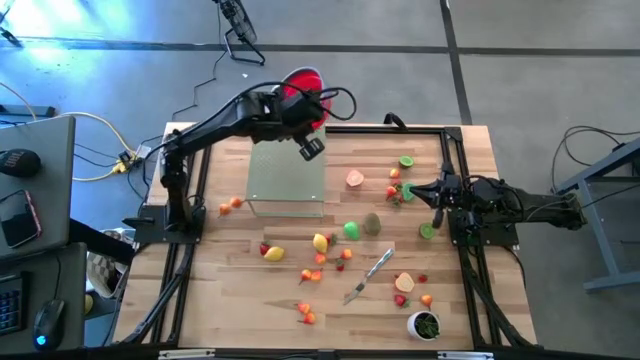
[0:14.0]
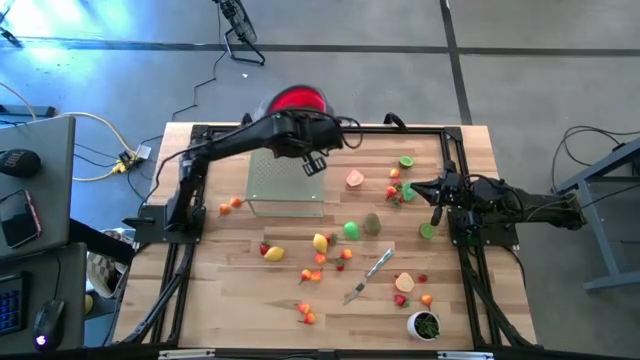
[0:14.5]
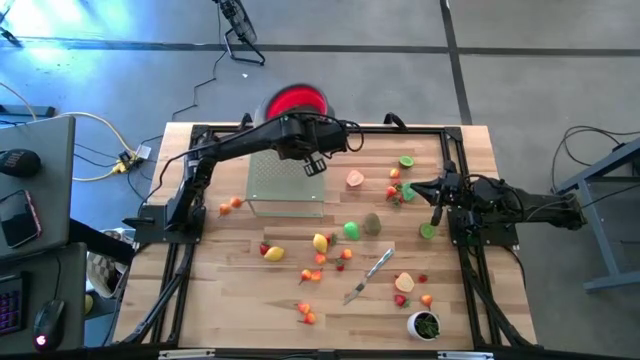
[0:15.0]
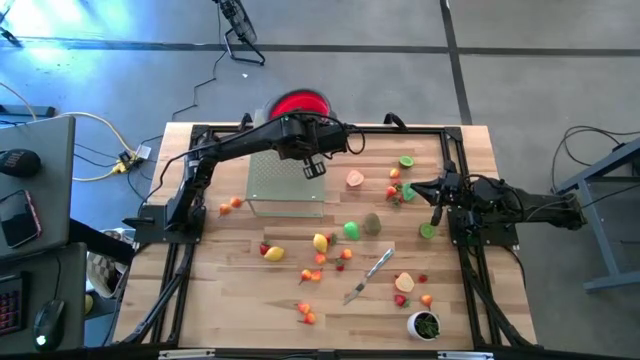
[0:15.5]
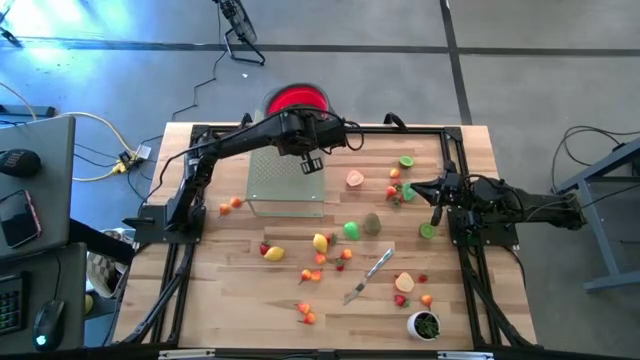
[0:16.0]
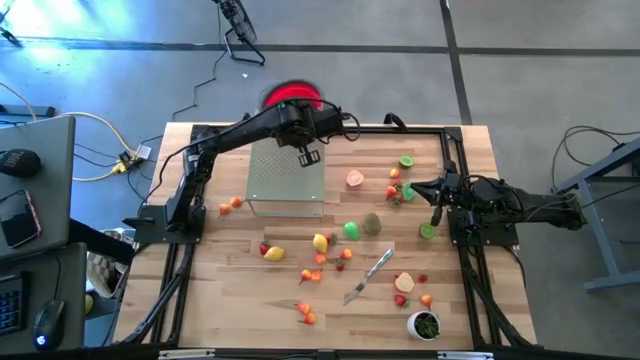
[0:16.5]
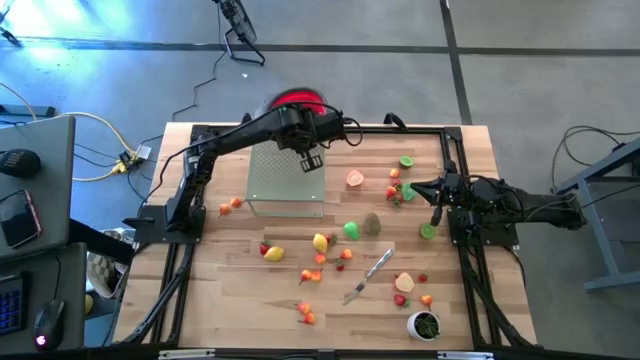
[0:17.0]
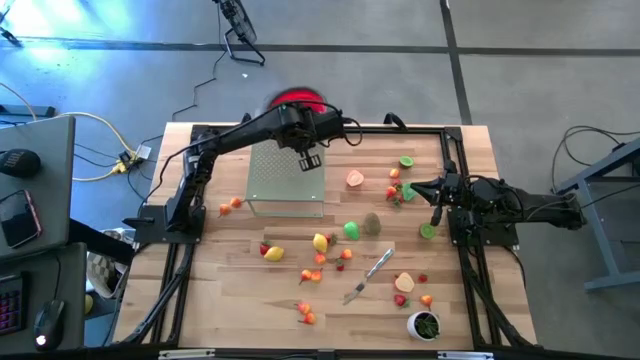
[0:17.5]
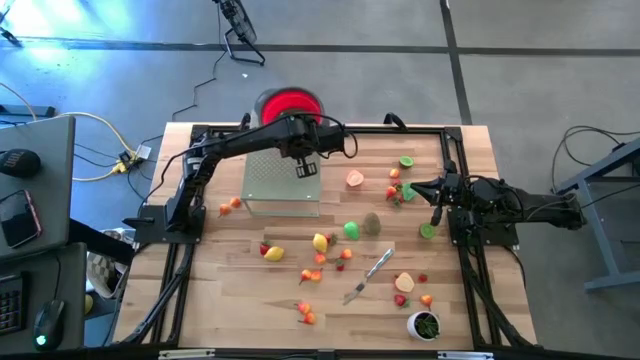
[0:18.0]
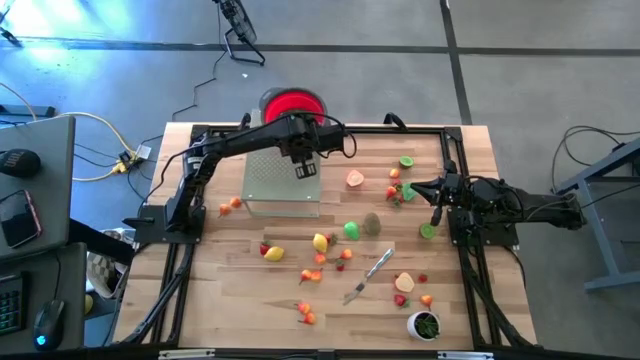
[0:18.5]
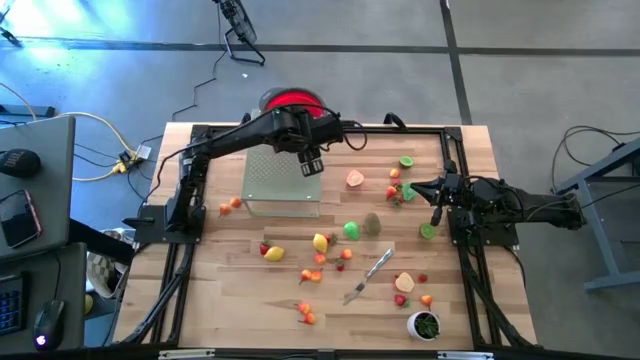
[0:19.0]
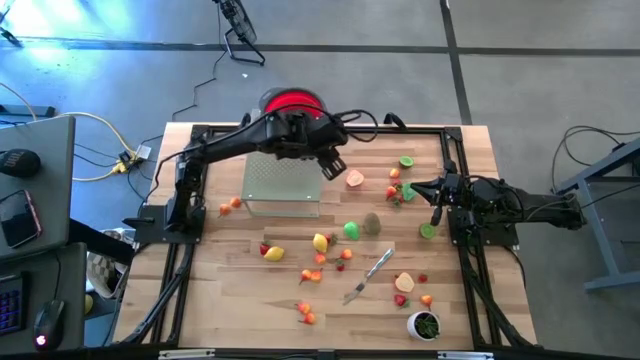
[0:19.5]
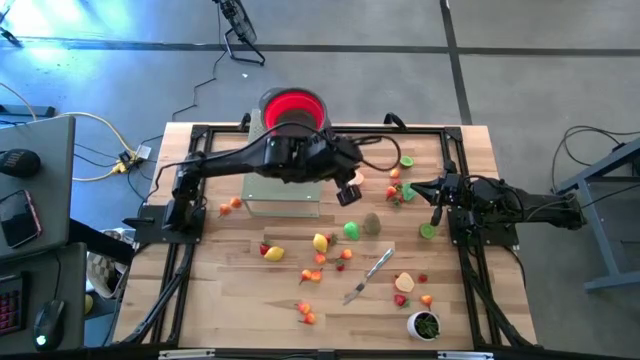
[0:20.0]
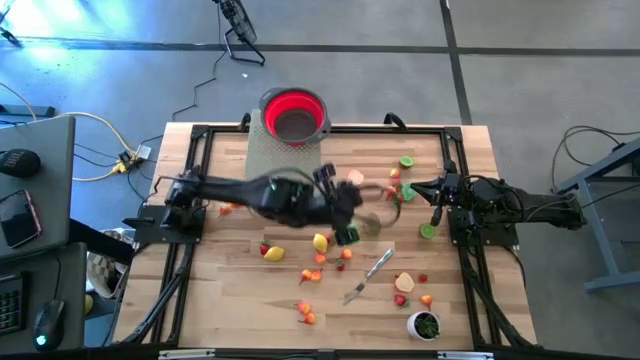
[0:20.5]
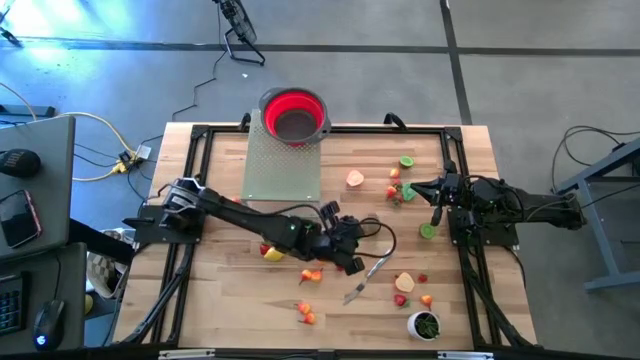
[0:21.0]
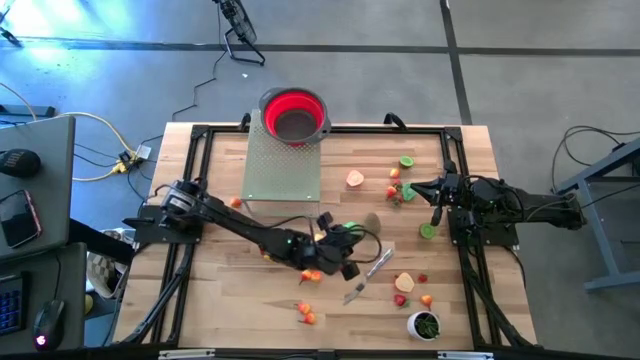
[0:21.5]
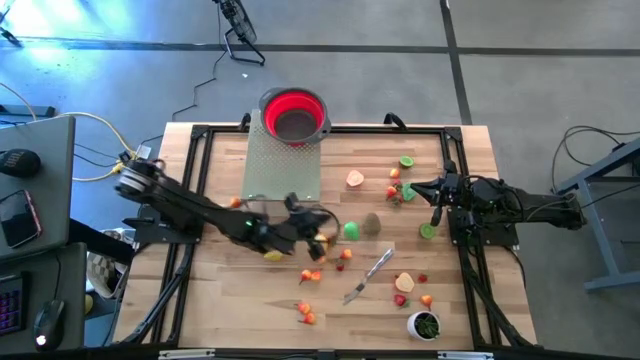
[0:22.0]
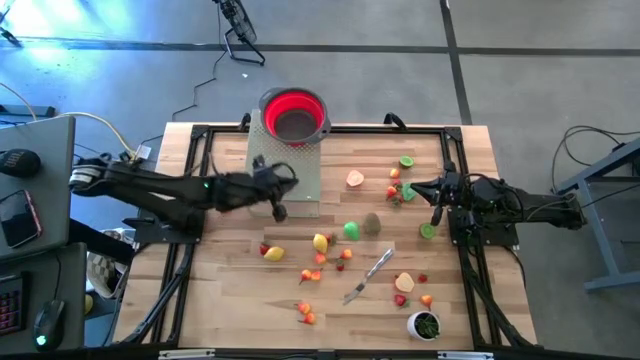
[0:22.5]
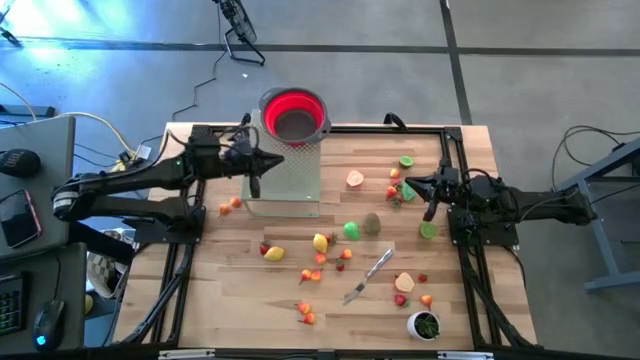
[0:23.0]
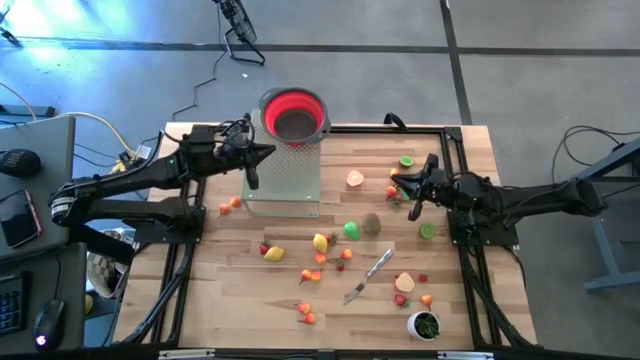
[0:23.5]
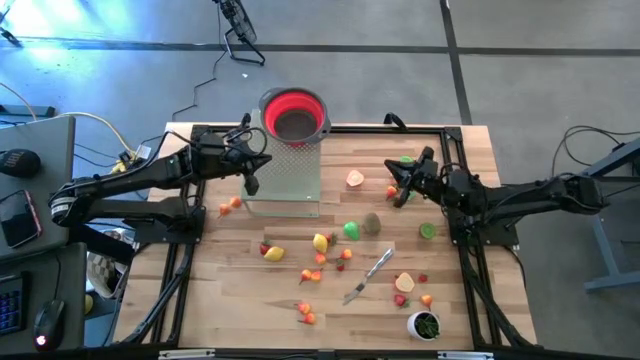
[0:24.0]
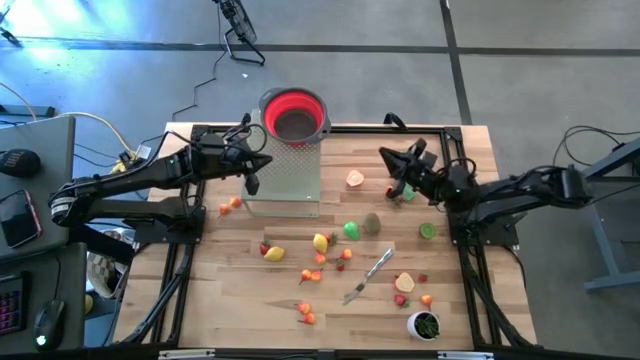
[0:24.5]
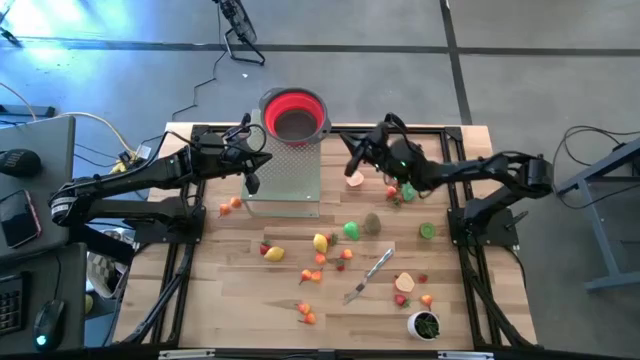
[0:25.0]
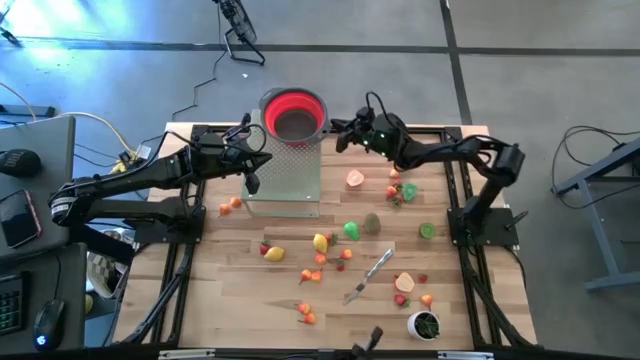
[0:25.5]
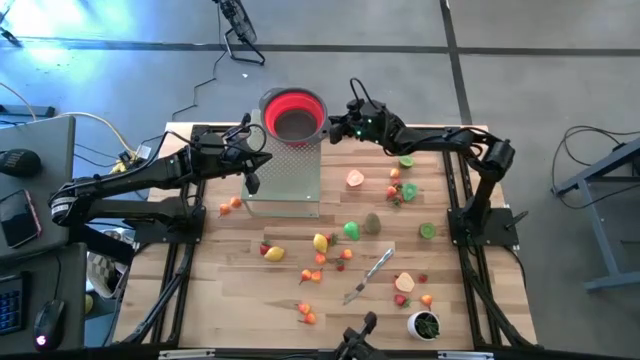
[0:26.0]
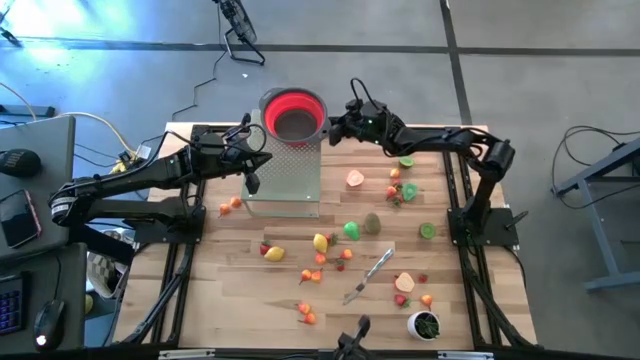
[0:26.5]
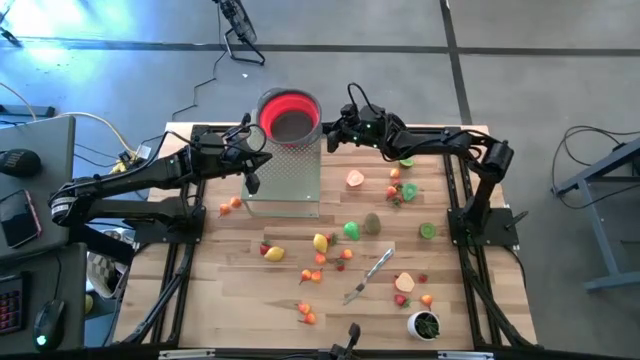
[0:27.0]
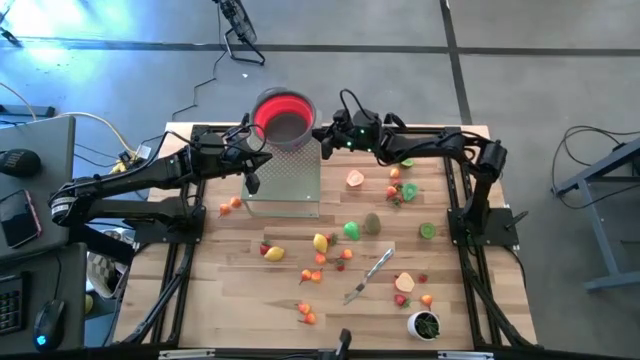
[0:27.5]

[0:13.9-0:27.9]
Task: Pick & Place Fruit
Put the red strainer on the shelf

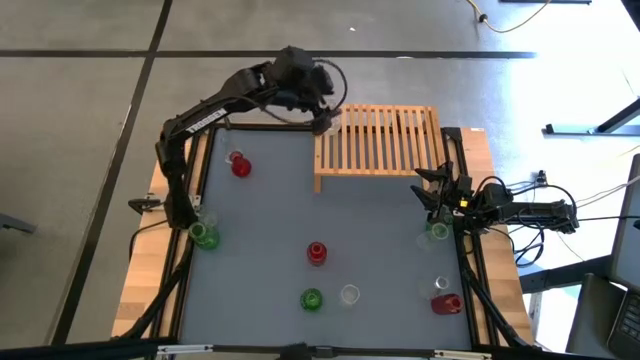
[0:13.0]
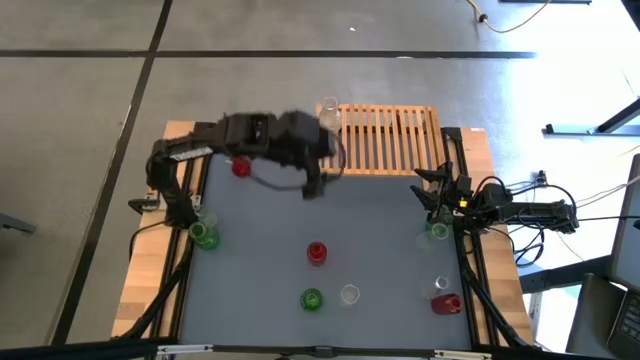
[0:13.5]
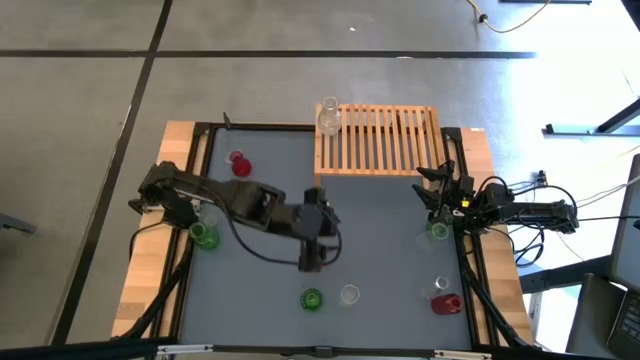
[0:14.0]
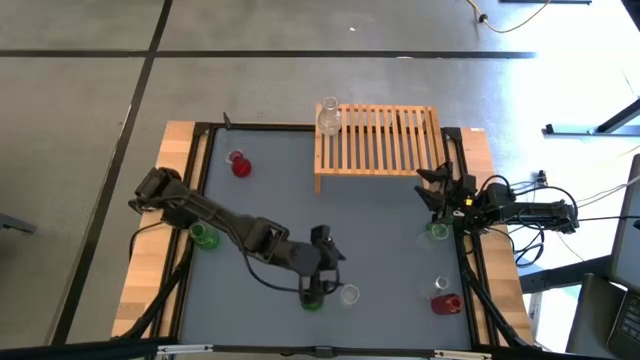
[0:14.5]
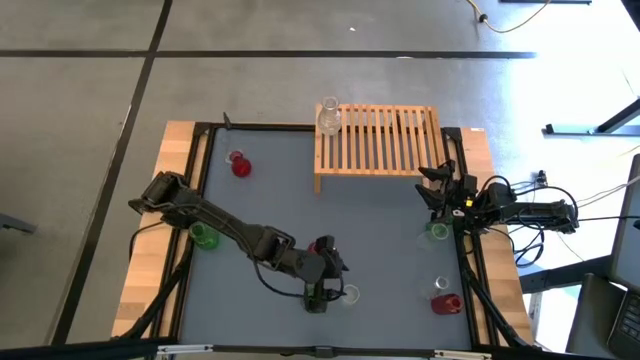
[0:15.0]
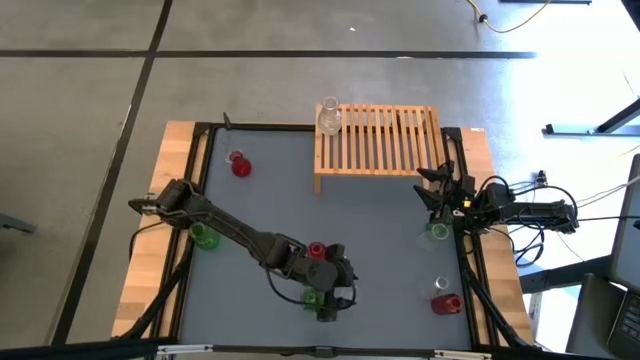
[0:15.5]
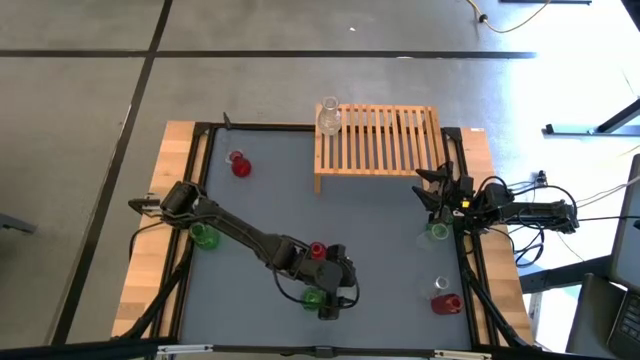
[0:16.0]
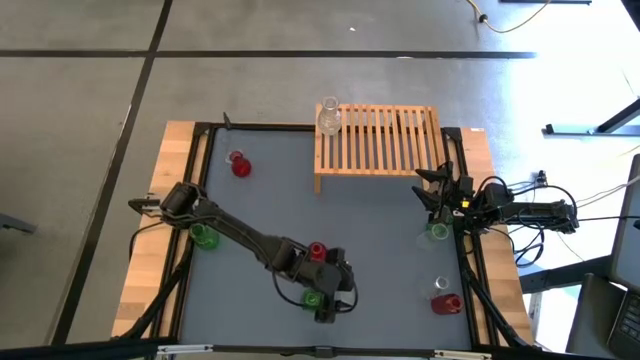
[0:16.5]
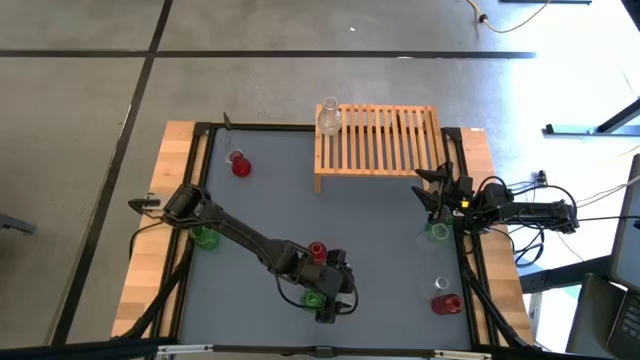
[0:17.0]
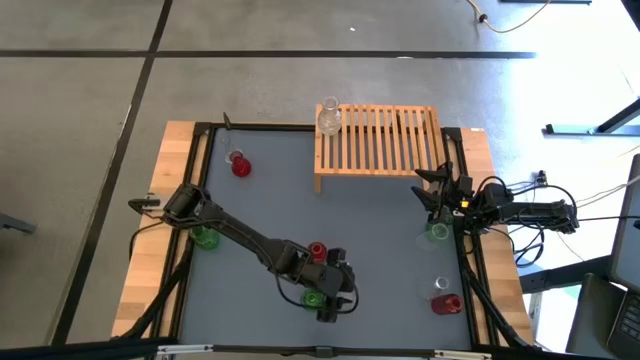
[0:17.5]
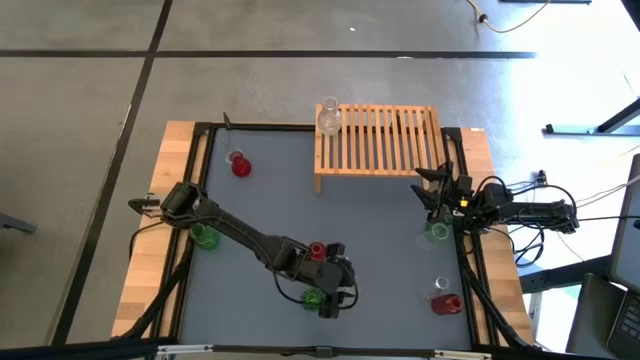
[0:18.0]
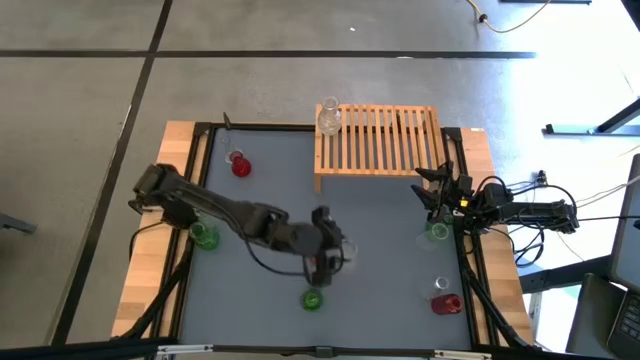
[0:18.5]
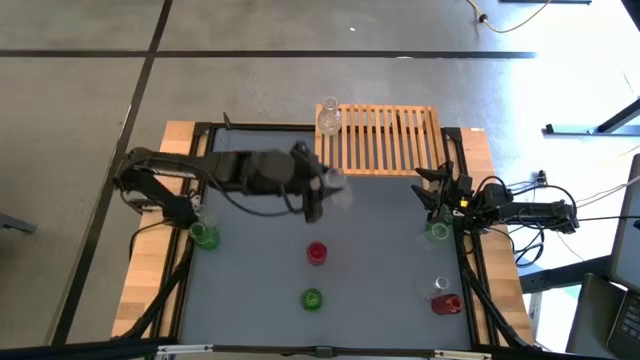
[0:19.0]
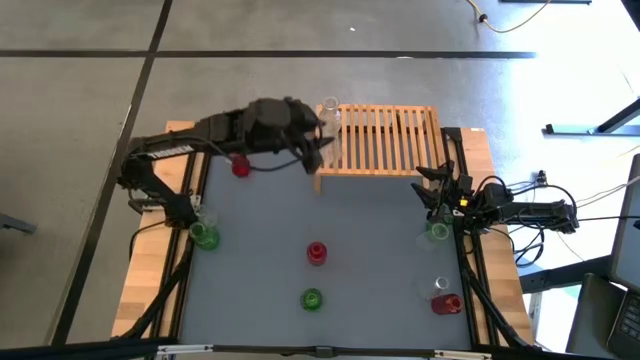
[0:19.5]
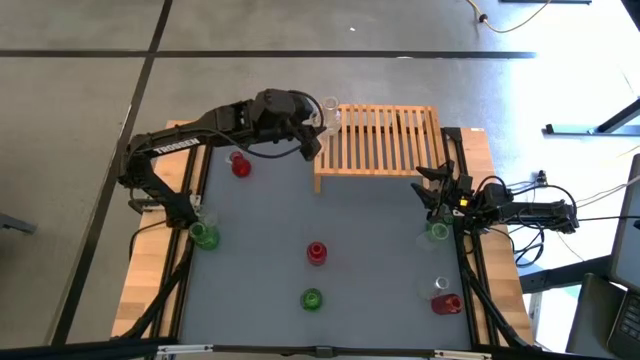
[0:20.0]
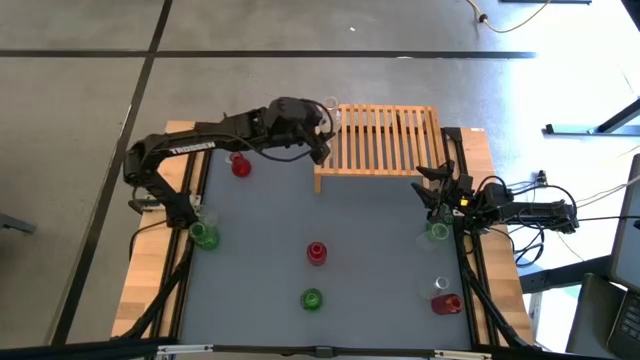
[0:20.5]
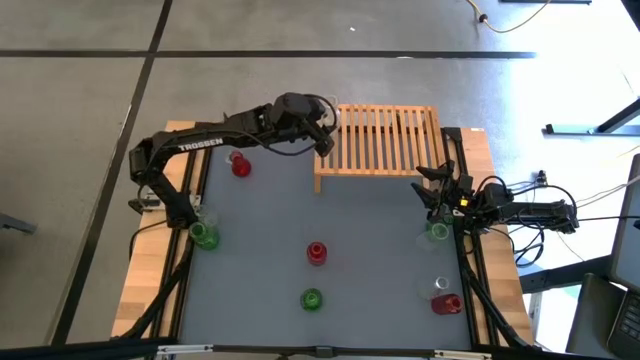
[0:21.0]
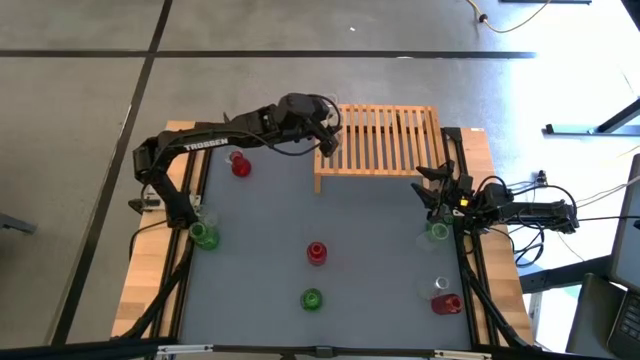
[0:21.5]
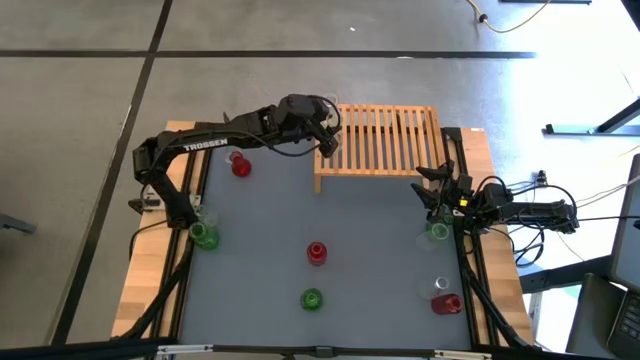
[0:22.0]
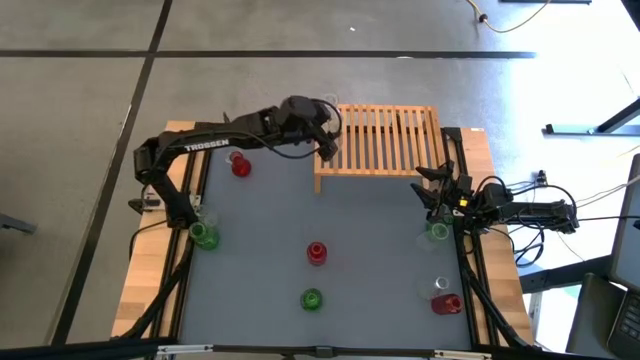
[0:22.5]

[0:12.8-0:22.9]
Task: sort vases onto shelf
Put the bottom center transparent vase onto the shelf
